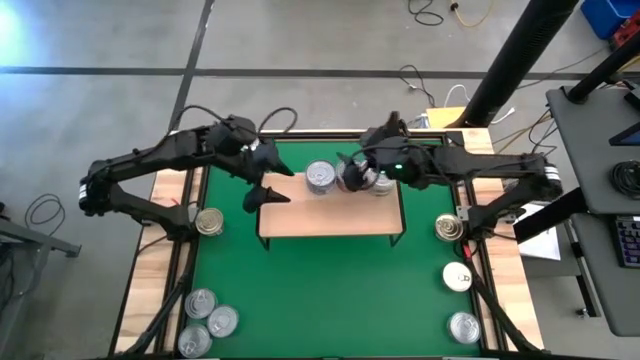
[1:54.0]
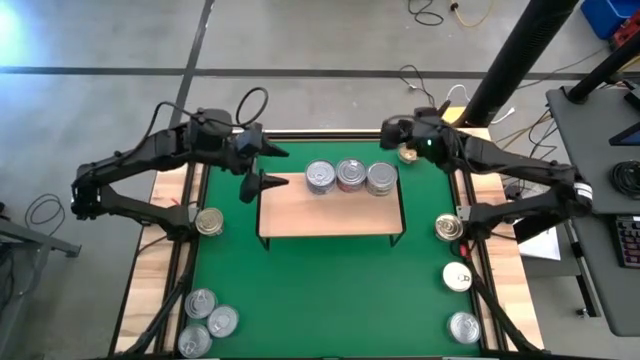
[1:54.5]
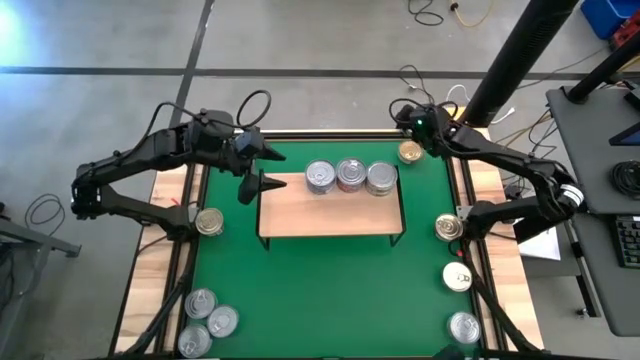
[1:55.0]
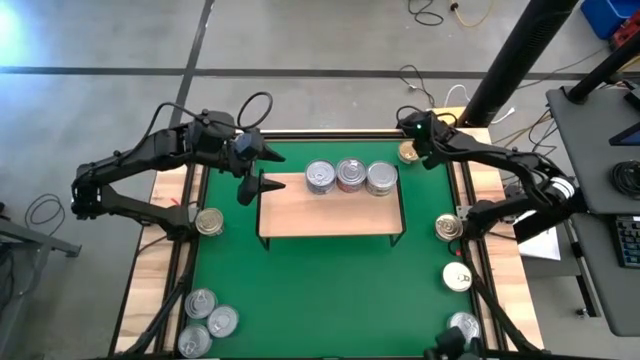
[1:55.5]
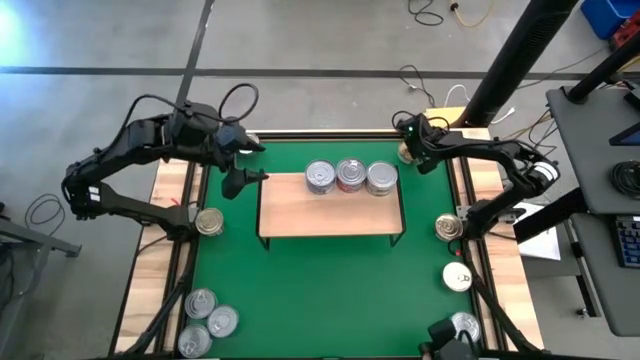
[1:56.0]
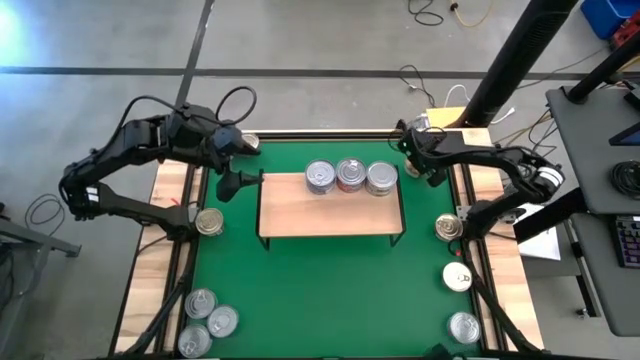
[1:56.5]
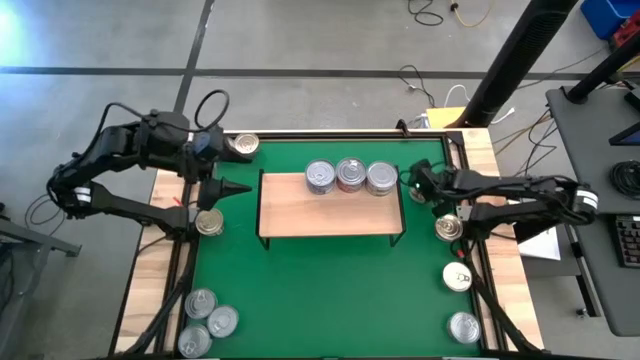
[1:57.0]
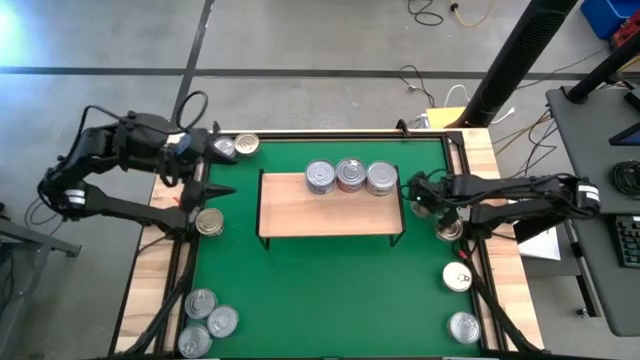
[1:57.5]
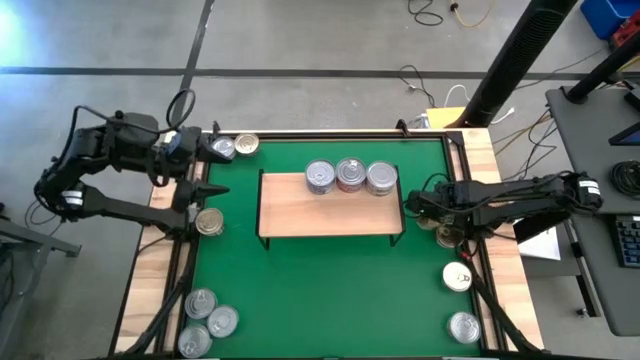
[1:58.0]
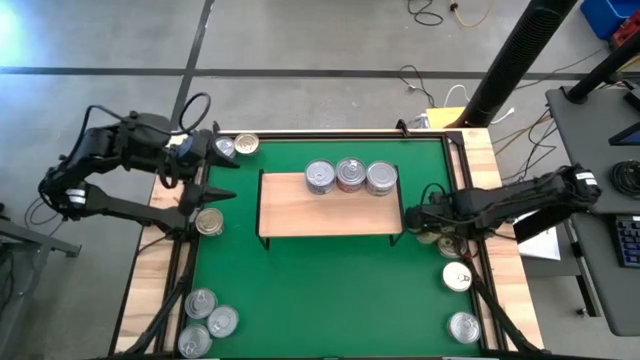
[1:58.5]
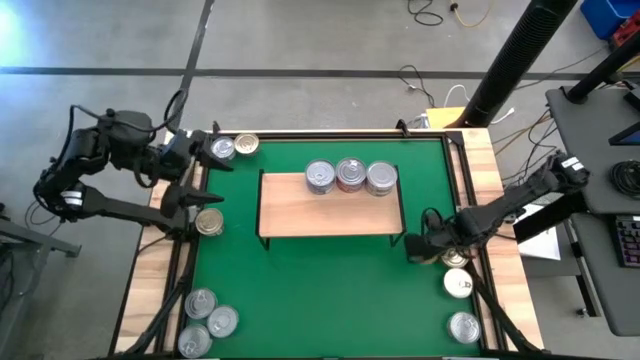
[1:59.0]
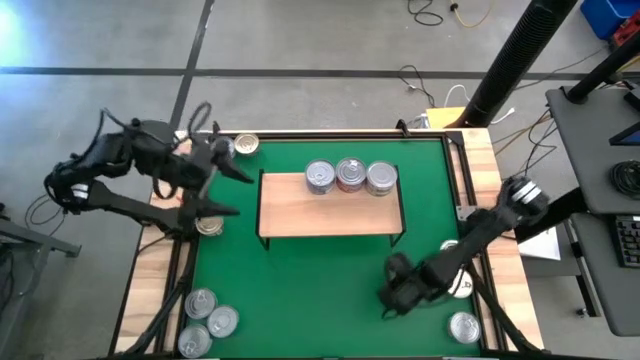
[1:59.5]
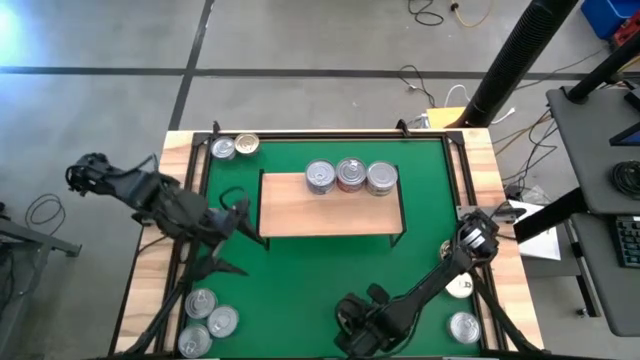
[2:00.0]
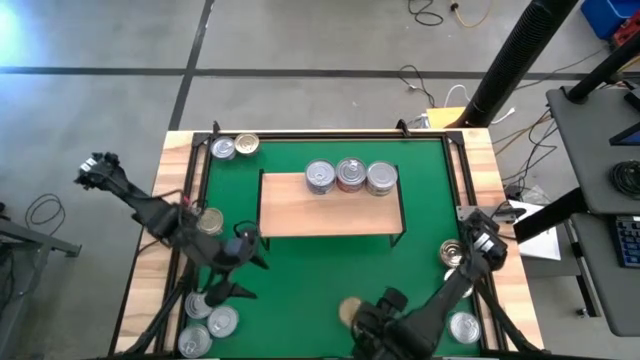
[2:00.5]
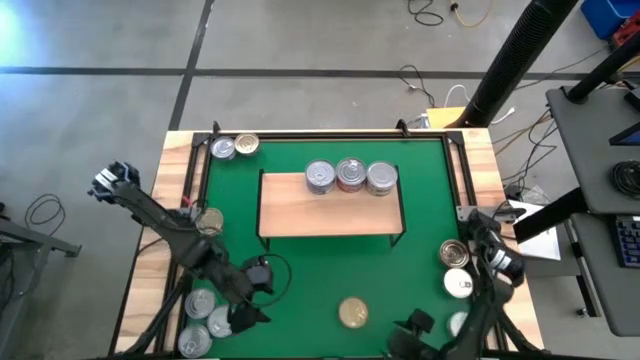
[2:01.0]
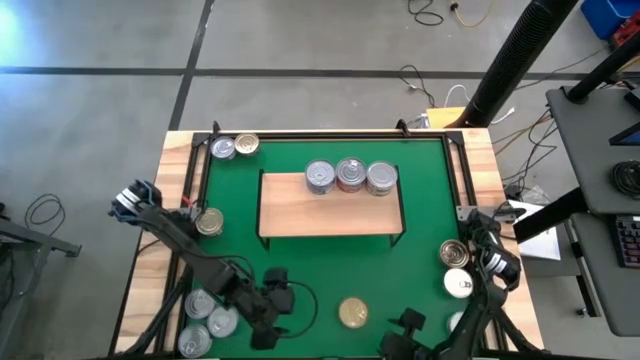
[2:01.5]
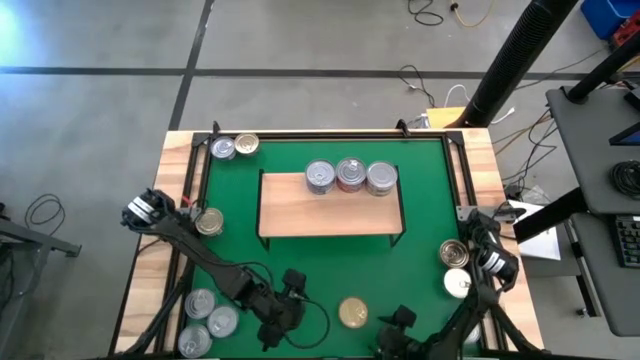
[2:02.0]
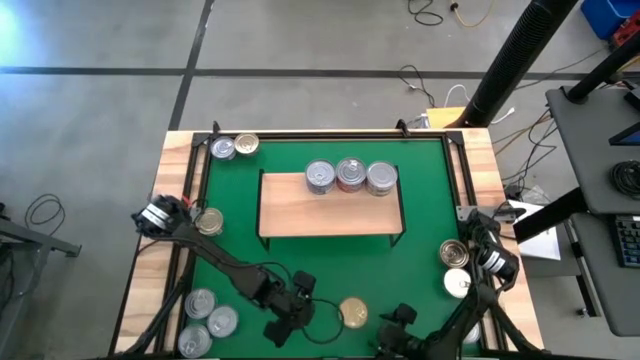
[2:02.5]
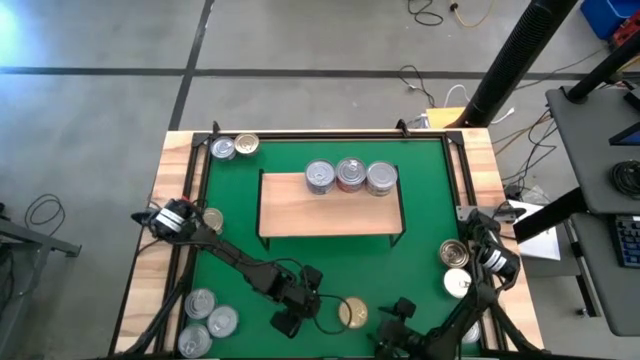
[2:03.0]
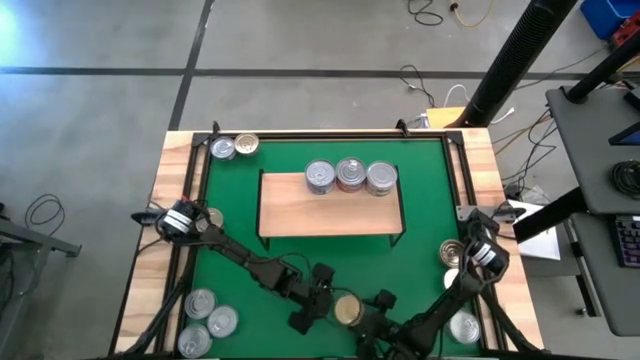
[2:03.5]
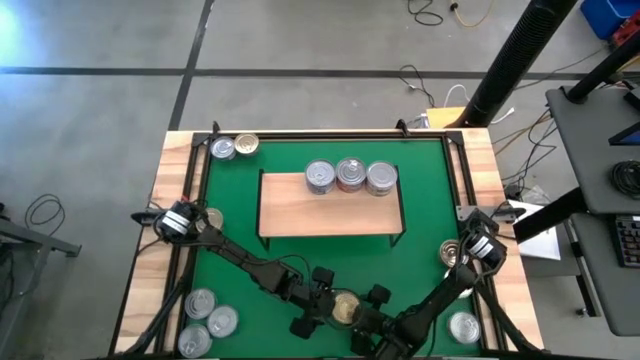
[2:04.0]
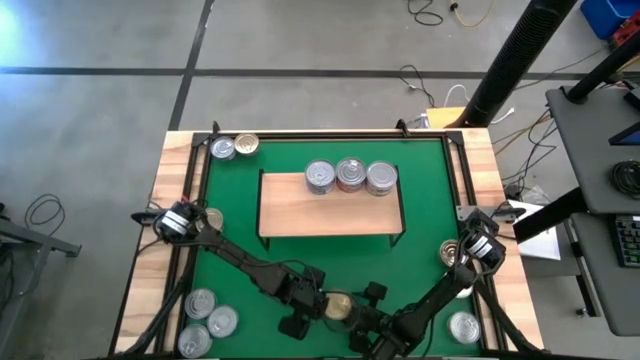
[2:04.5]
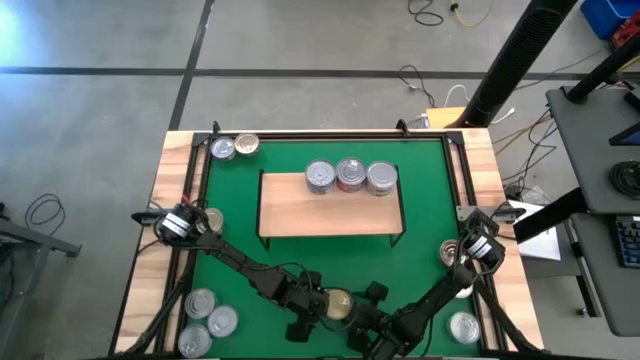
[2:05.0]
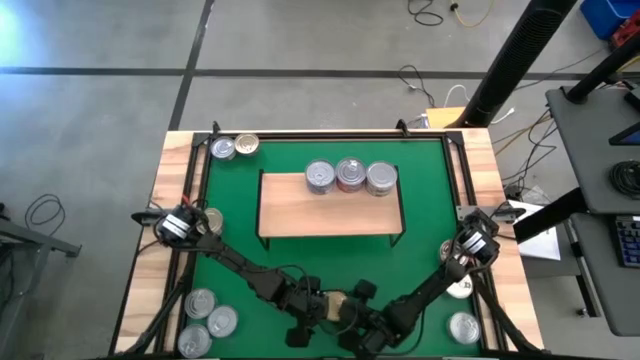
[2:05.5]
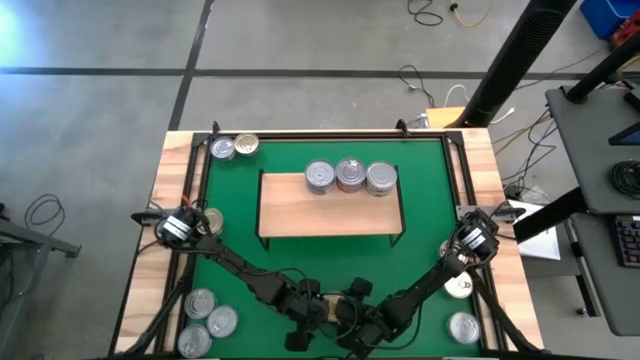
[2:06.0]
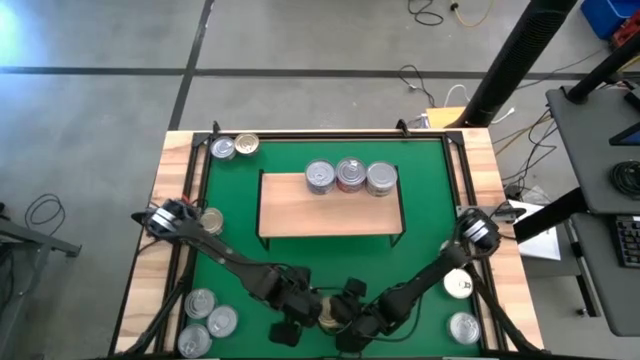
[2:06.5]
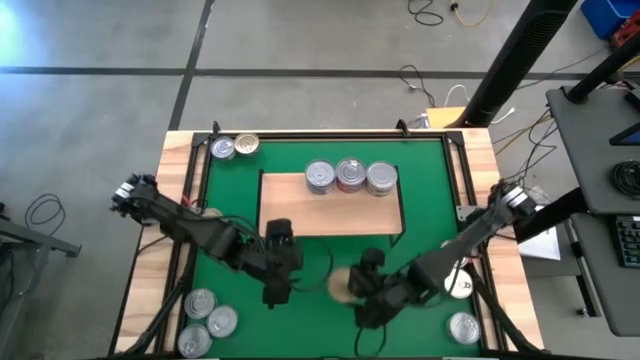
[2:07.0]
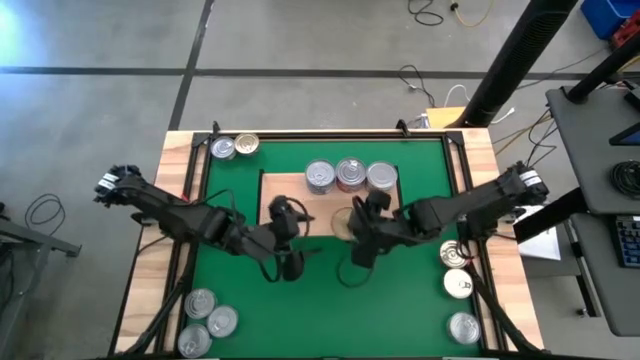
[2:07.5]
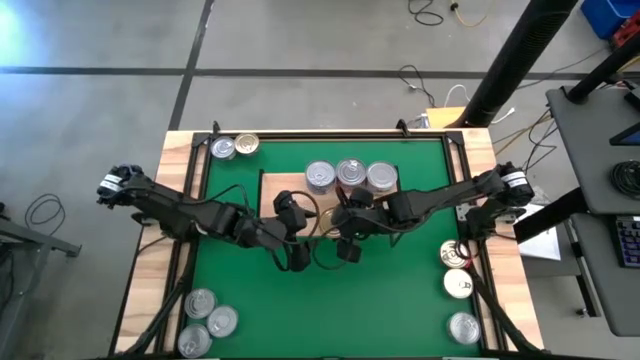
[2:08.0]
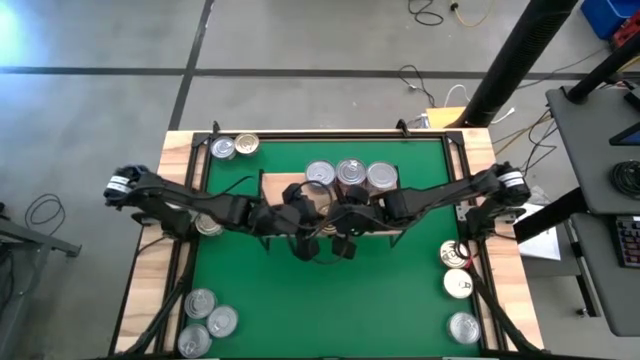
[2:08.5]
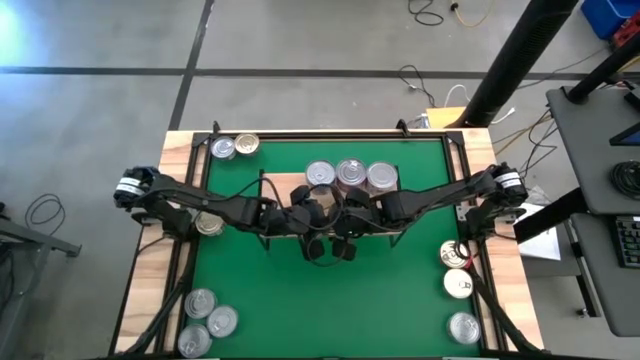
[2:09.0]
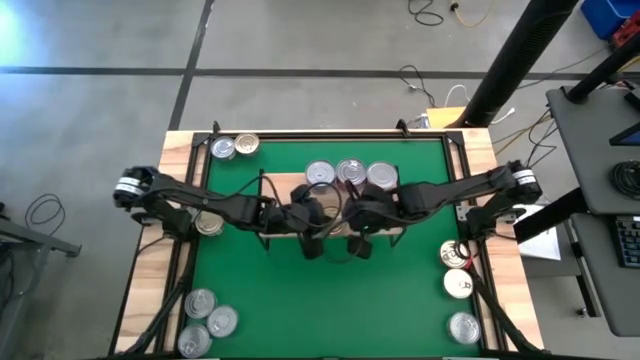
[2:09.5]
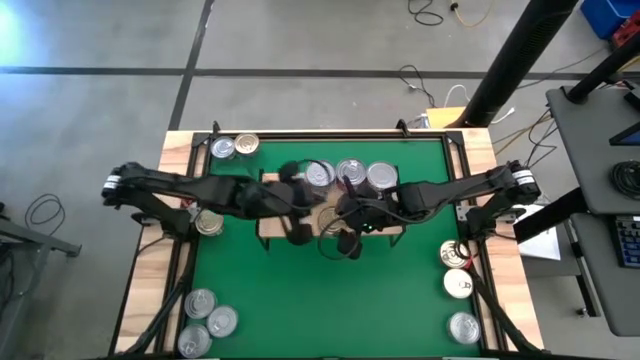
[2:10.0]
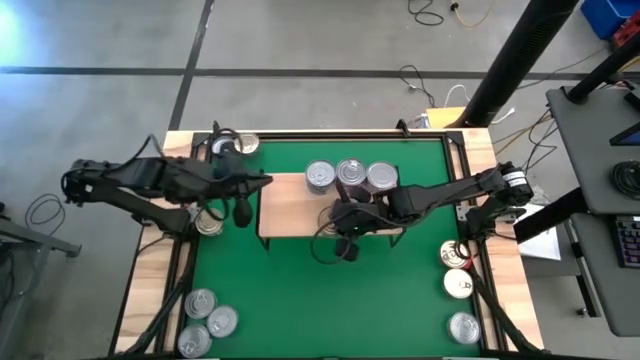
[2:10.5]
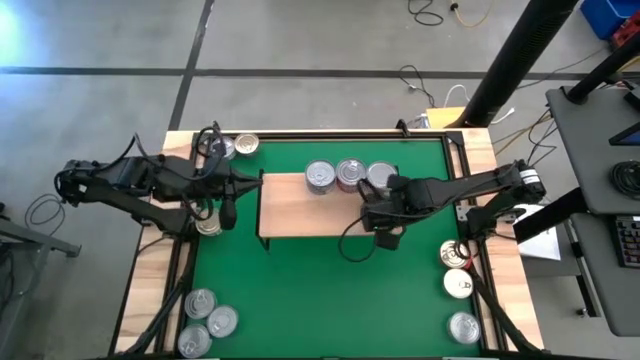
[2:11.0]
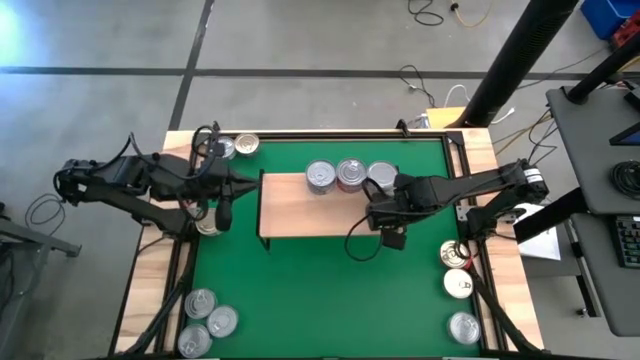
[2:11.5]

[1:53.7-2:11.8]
Task: Stack canned seafood by type on shelf
Put the right green tuna can on the shelf
